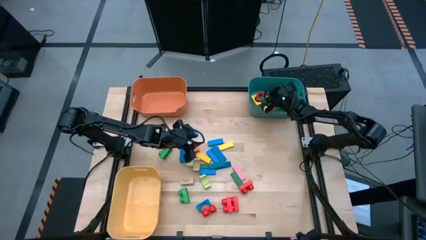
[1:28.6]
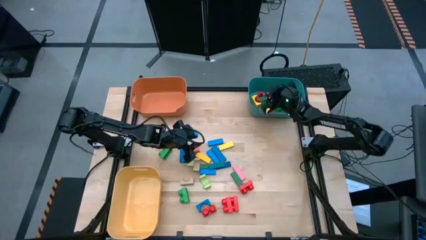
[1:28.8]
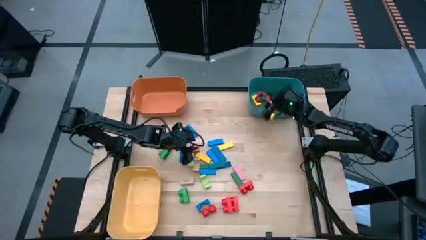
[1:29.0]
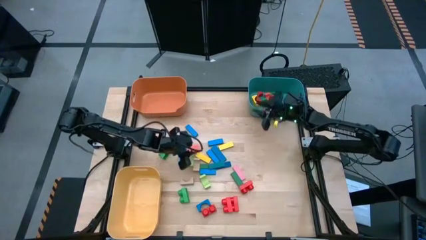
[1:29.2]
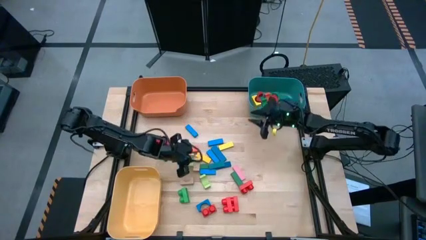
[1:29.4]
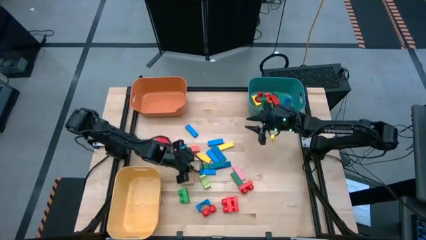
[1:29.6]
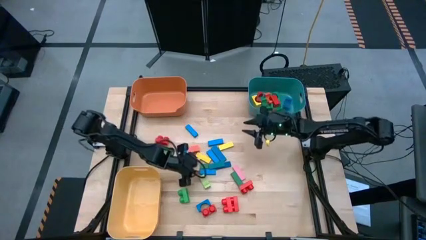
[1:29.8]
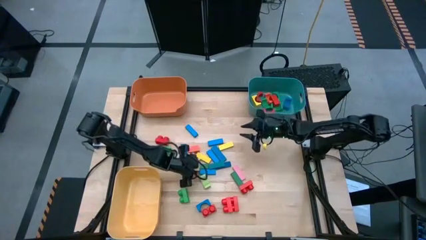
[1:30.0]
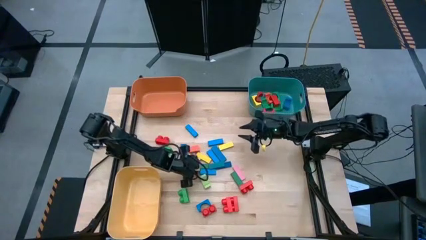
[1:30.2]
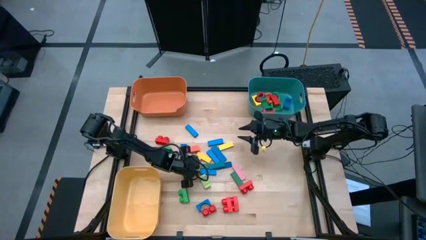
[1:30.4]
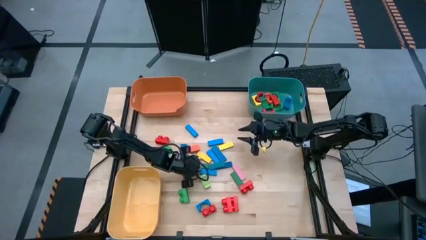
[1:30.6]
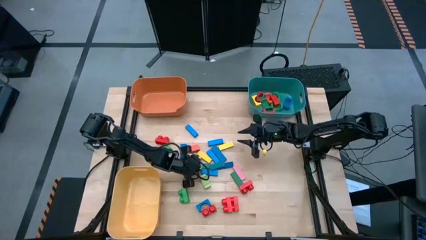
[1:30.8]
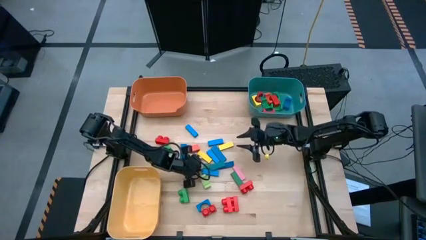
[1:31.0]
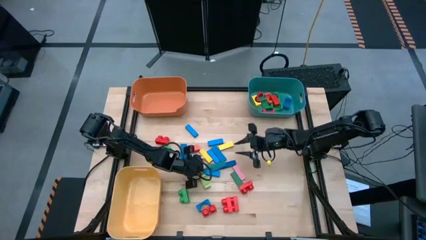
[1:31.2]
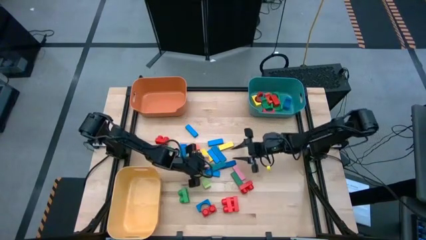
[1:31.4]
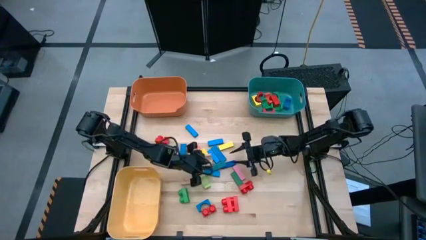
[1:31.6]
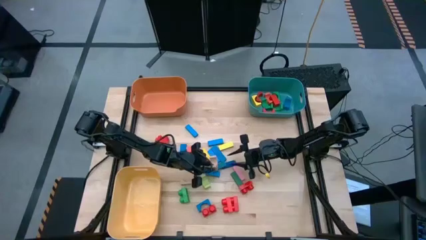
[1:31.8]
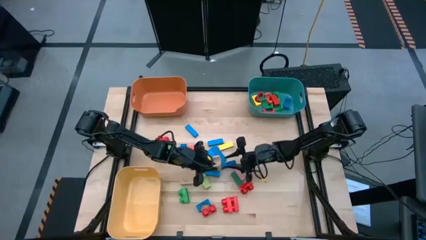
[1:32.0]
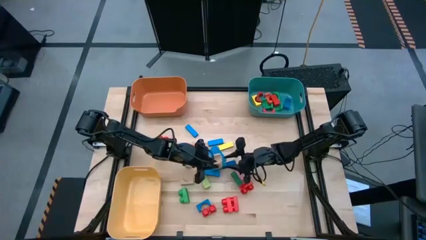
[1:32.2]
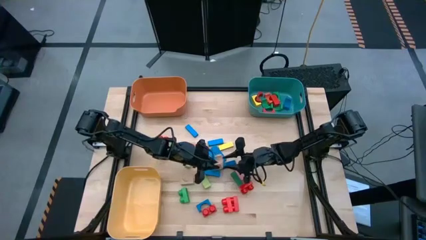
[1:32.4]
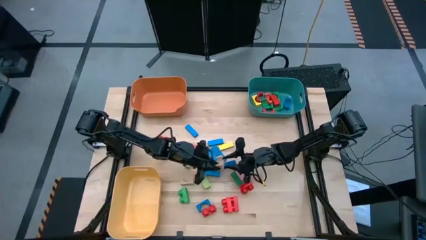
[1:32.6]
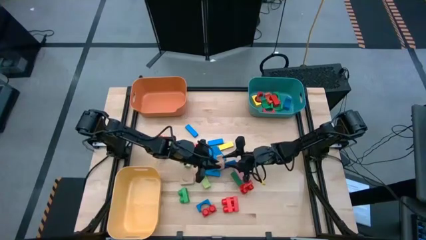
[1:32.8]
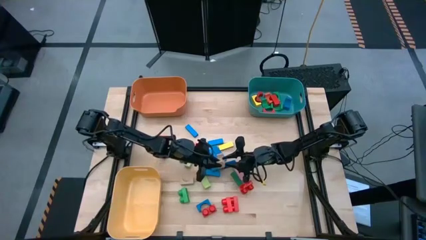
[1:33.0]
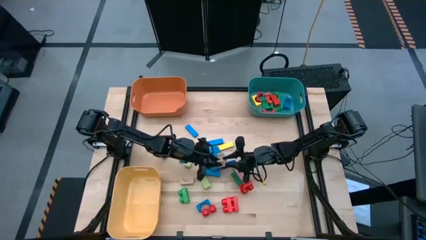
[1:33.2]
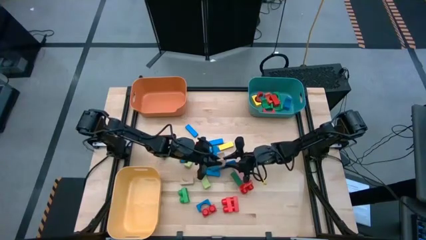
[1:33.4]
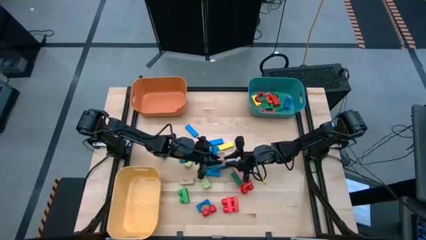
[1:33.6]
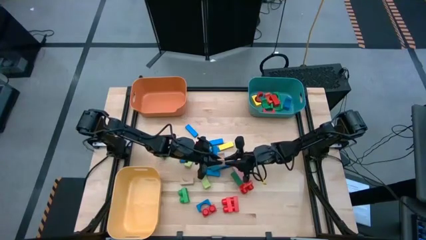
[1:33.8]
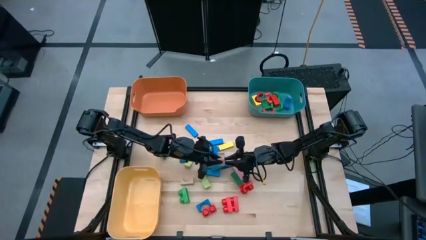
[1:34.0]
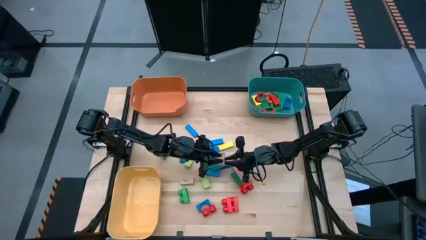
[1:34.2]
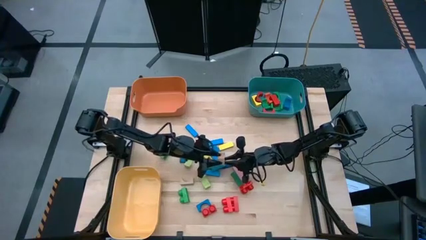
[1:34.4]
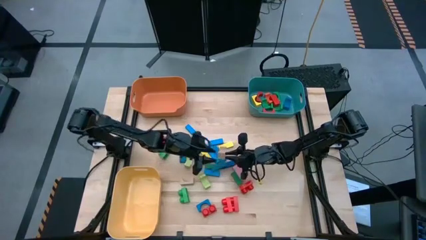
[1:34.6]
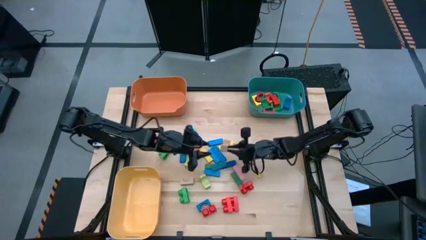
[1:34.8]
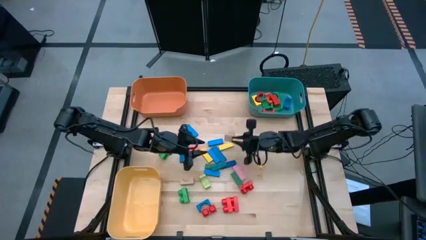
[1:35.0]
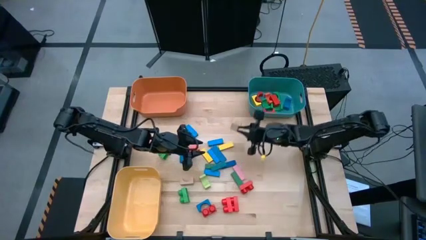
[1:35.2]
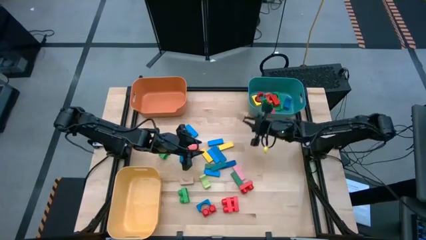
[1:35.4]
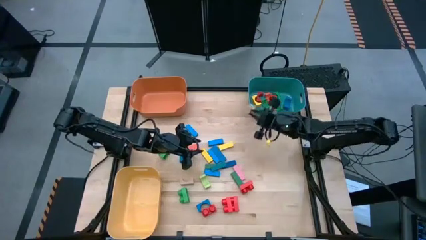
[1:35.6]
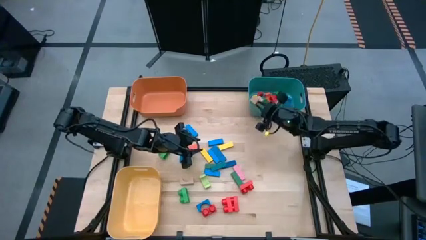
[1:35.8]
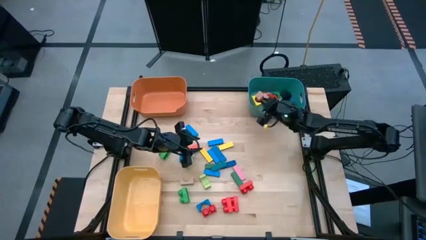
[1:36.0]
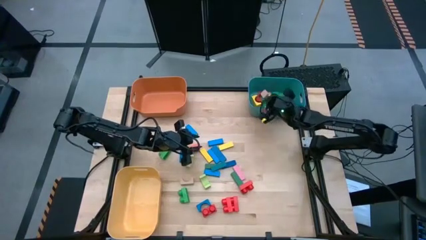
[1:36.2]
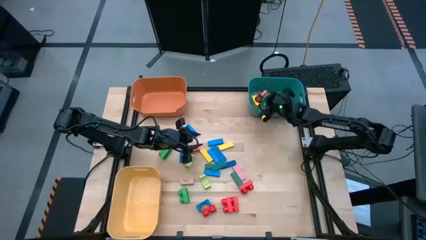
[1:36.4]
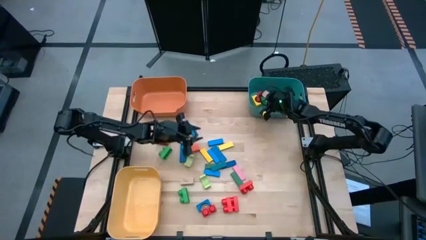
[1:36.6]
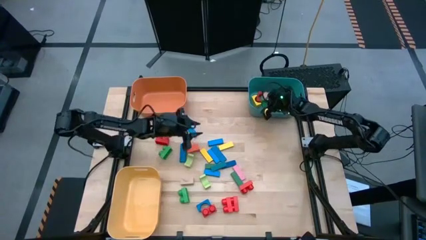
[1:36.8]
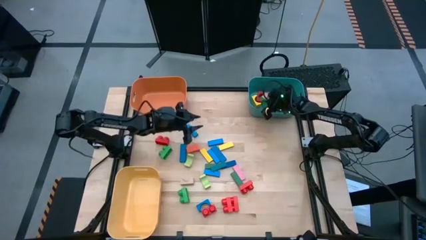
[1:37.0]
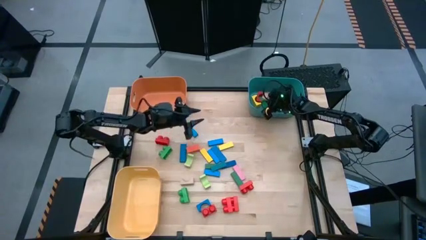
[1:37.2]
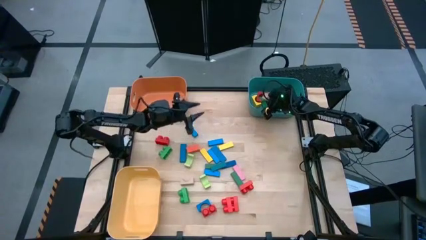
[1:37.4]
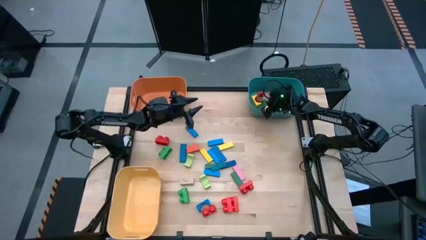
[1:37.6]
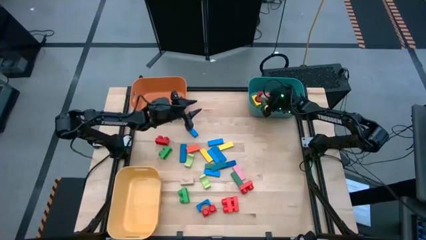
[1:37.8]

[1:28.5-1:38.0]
Task: Sort blocks by size
Put the brown arch block into the blue bin

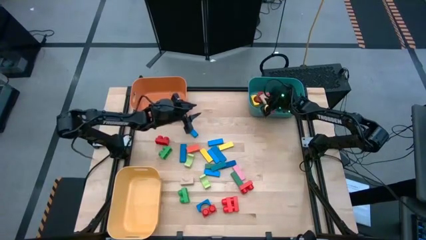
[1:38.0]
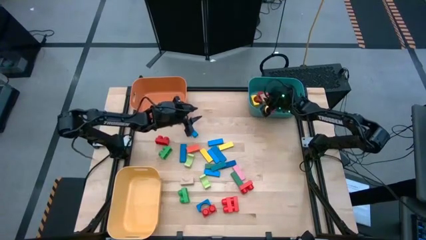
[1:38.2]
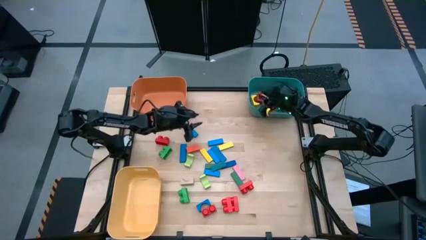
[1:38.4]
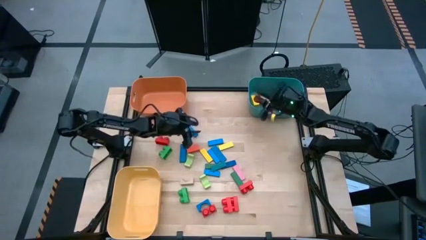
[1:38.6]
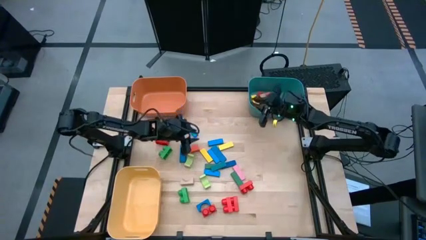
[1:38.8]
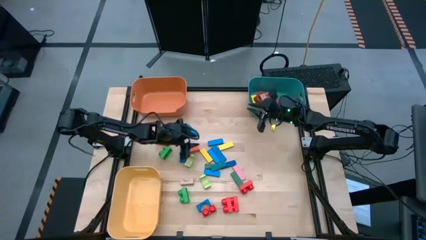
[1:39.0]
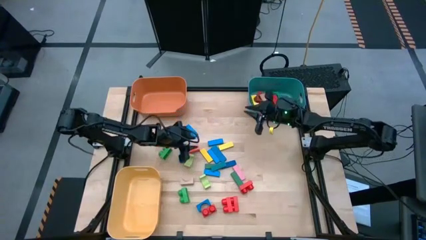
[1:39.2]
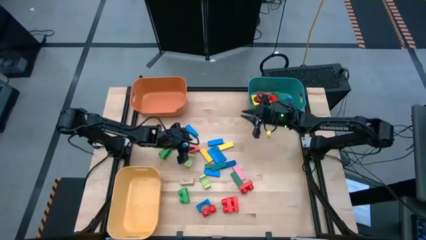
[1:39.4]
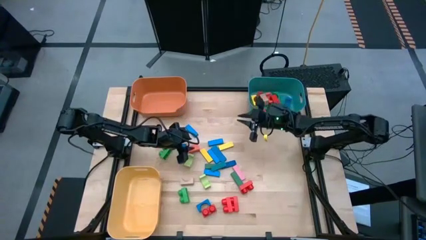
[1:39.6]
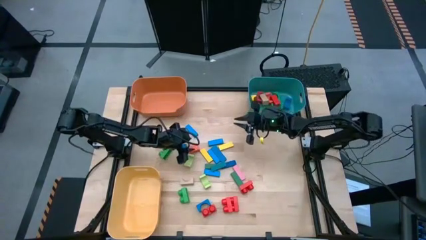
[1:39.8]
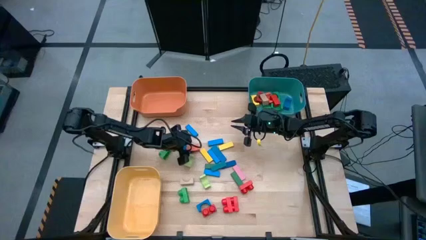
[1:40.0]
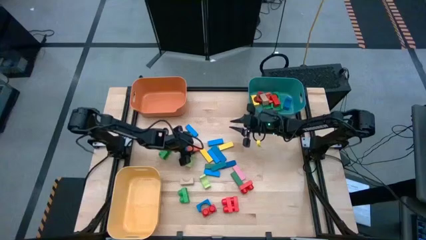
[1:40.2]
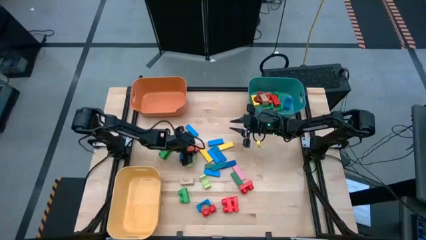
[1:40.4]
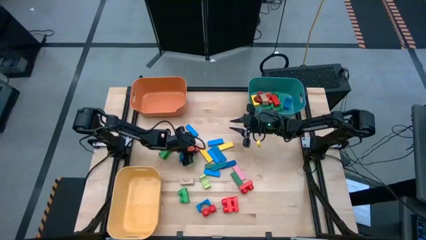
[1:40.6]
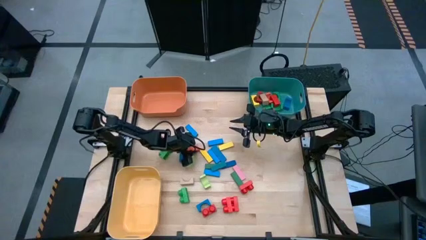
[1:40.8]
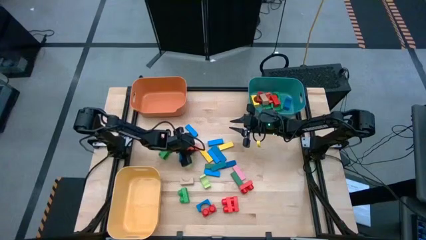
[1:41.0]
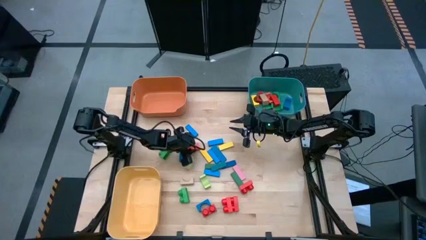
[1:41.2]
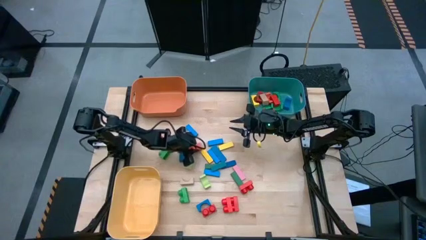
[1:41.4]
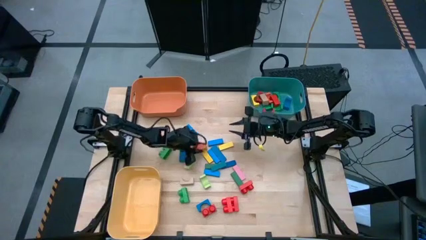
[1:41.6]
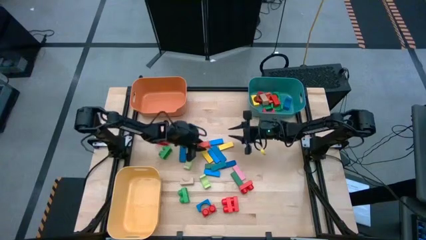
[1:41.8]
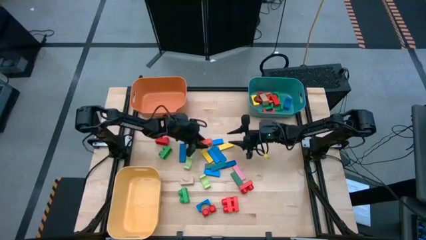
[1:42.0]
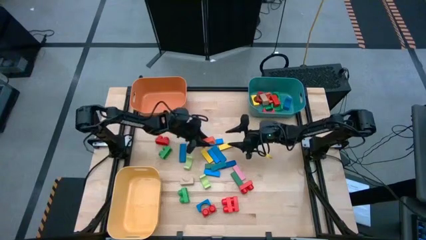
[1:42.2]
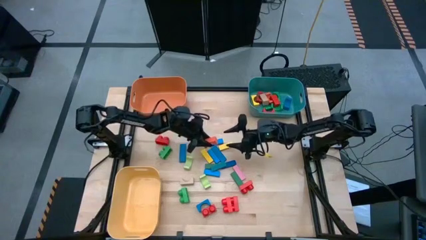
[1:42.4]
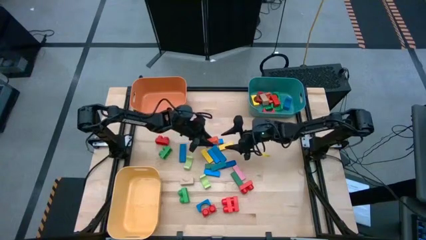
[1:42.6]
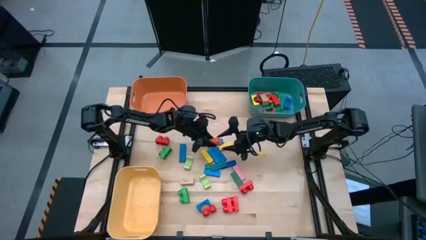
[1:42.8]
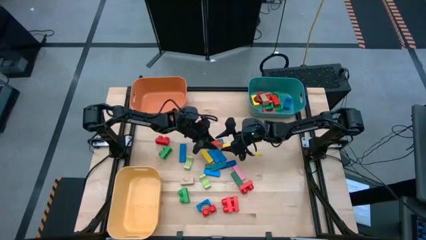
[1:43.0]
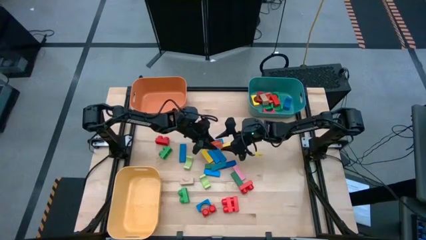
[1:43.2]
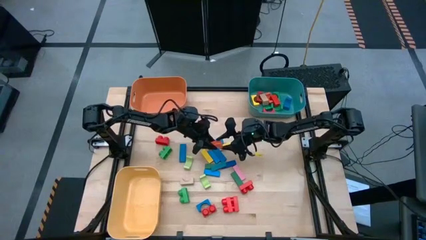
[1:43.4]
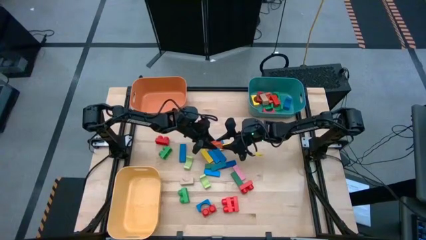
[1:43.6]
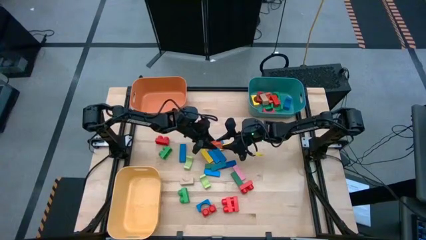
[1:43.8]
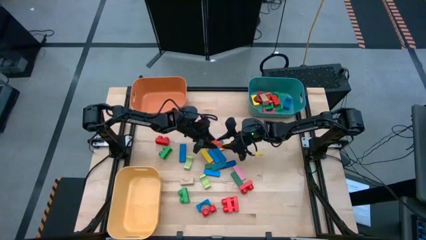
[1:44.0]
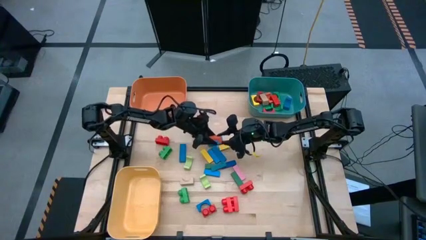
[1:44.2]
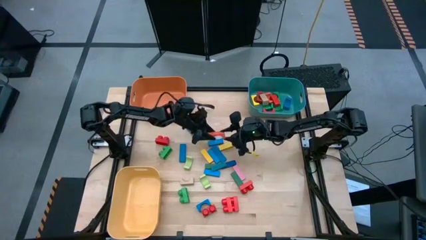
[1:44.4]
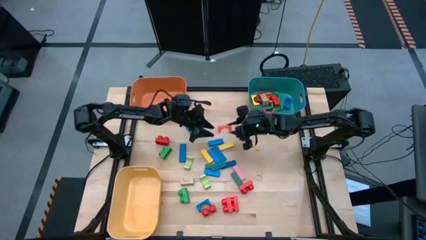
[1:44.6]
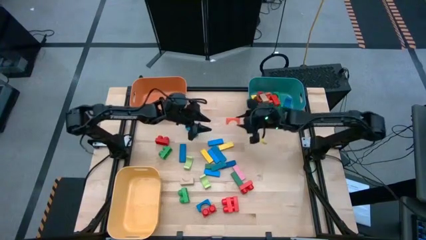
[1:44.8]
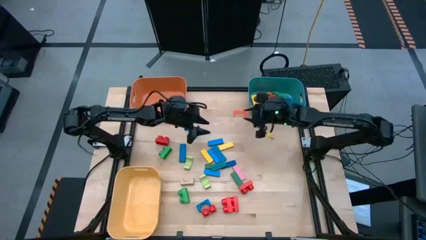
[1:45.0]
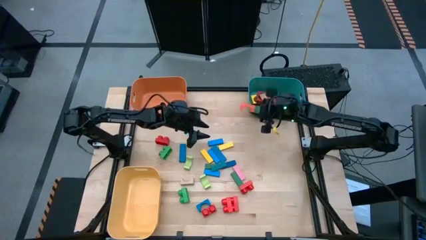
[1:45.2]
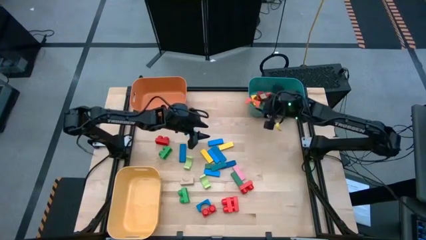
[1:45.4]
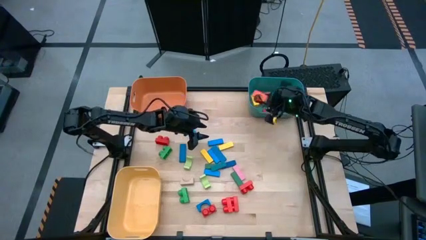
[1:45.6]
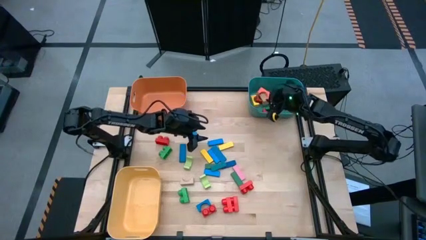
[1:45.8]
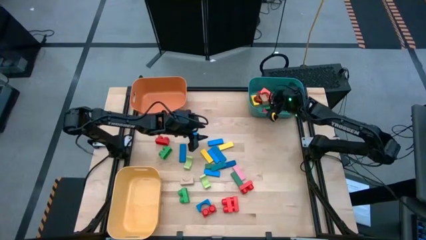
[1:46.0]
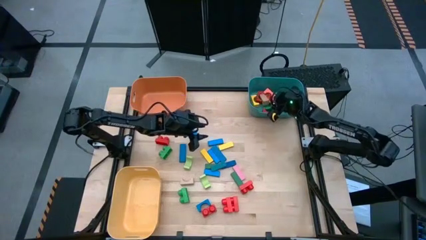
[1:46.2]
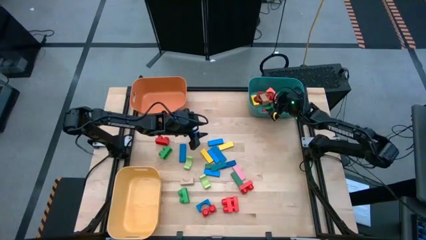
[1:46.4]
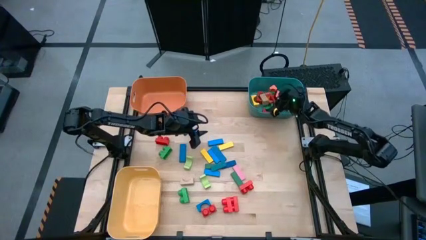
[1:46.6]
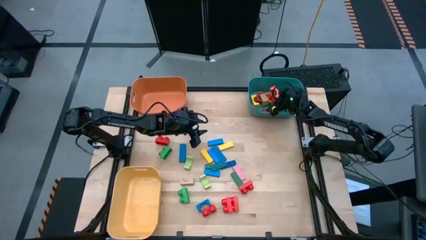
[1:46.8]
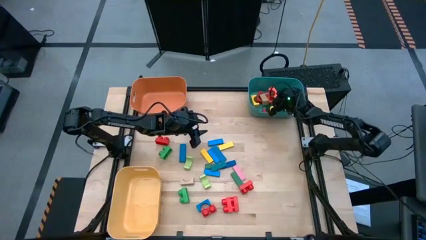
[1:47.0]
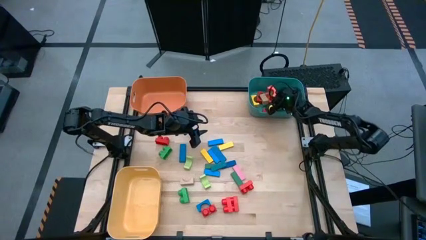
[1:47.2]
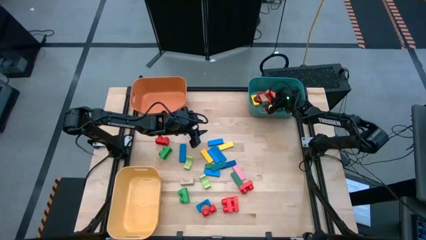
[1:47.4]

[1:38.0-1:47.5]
Put the orange arch block into the blue bin
